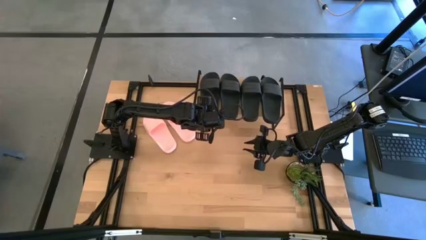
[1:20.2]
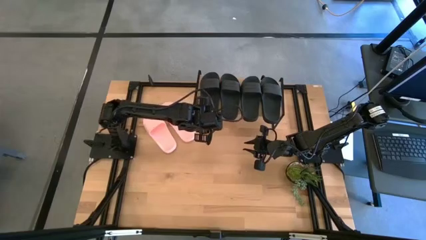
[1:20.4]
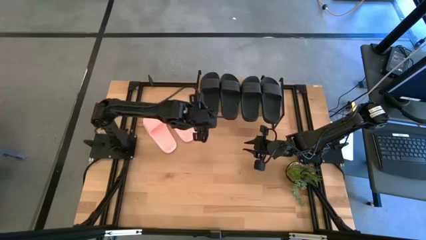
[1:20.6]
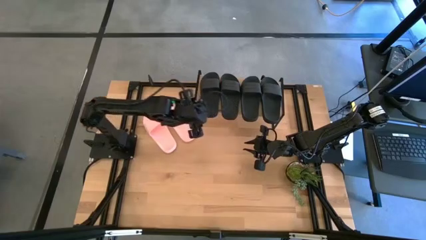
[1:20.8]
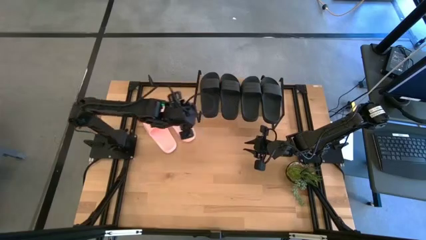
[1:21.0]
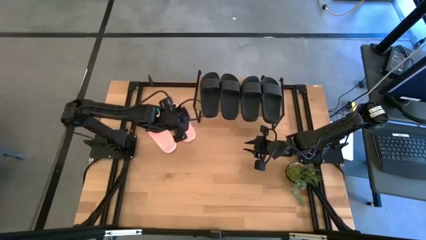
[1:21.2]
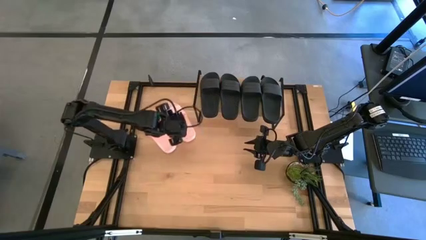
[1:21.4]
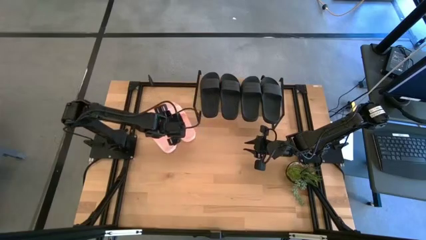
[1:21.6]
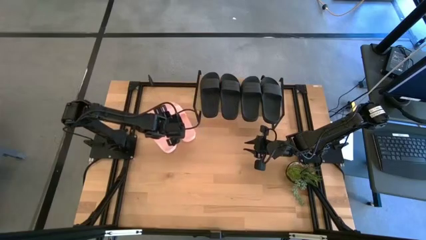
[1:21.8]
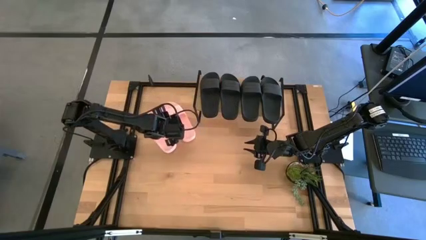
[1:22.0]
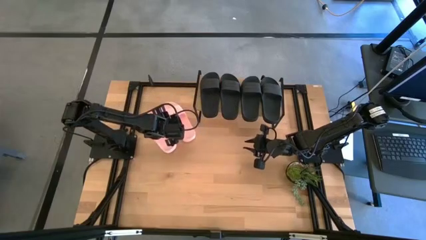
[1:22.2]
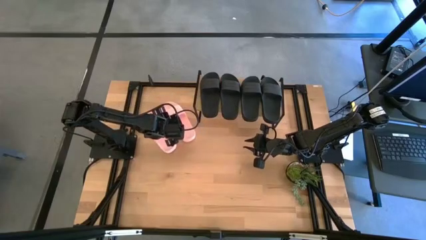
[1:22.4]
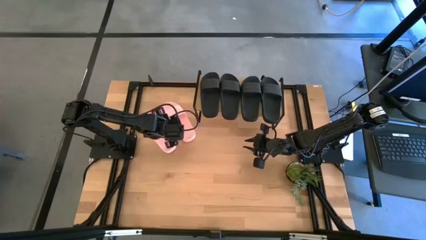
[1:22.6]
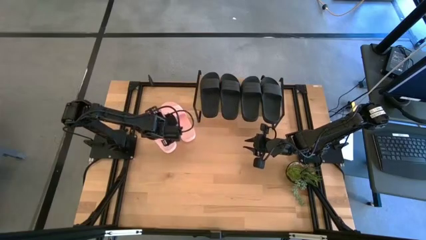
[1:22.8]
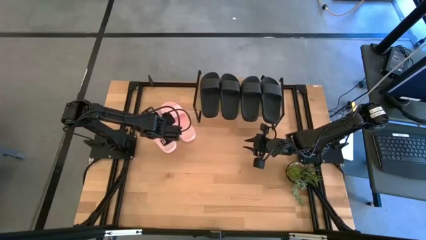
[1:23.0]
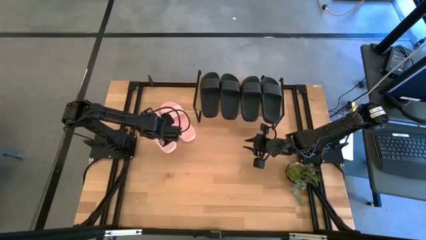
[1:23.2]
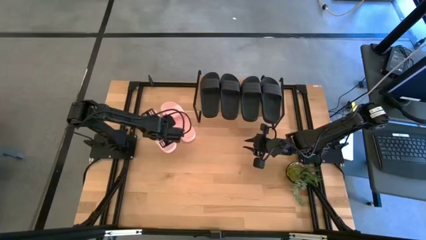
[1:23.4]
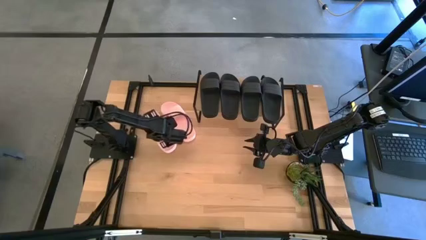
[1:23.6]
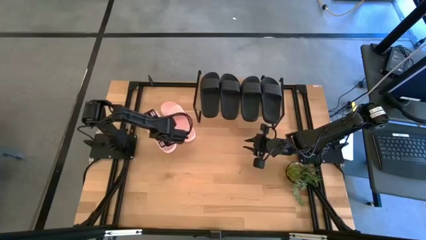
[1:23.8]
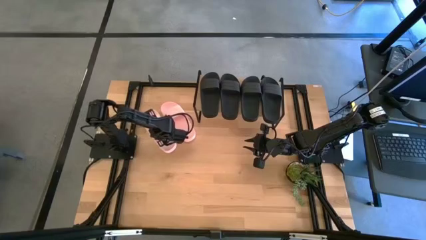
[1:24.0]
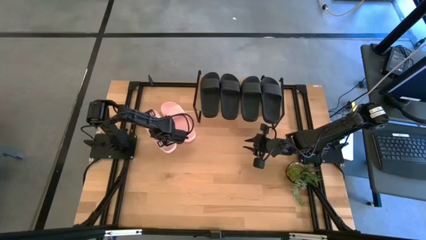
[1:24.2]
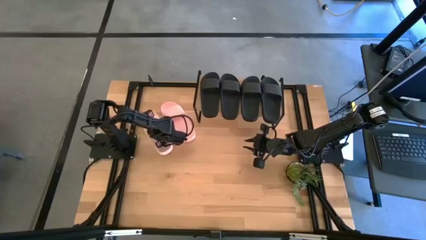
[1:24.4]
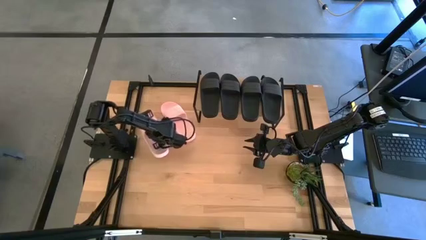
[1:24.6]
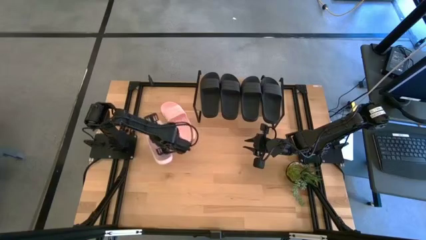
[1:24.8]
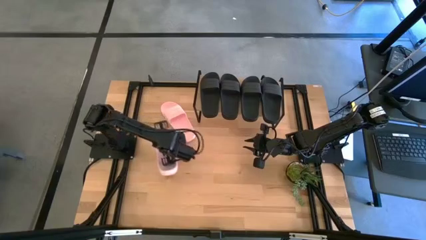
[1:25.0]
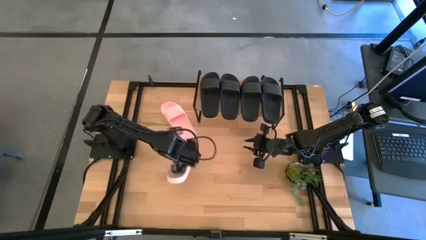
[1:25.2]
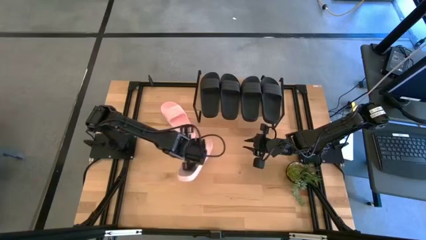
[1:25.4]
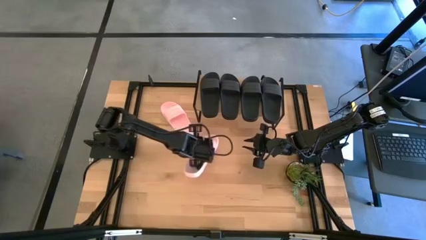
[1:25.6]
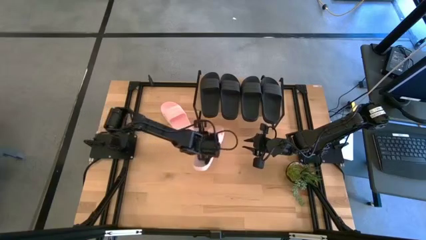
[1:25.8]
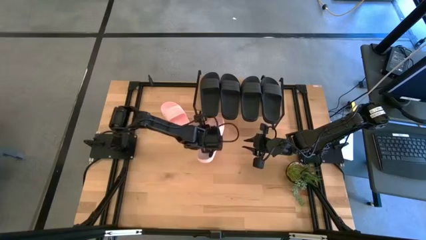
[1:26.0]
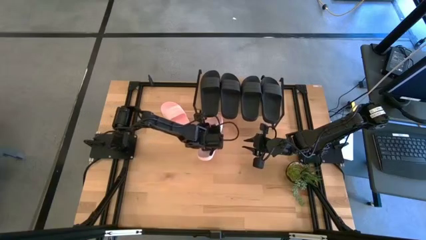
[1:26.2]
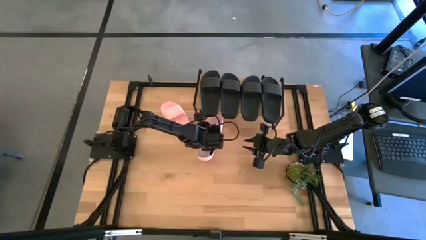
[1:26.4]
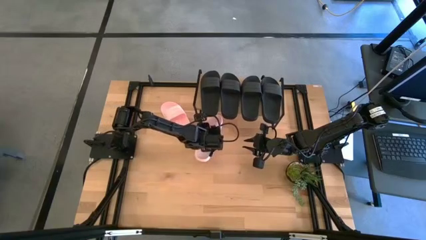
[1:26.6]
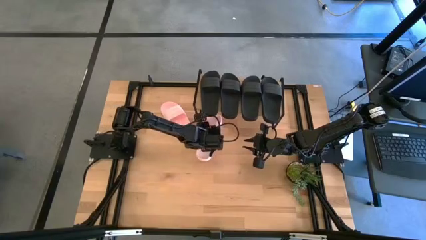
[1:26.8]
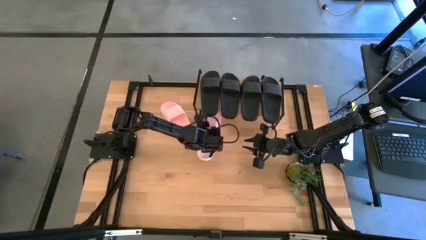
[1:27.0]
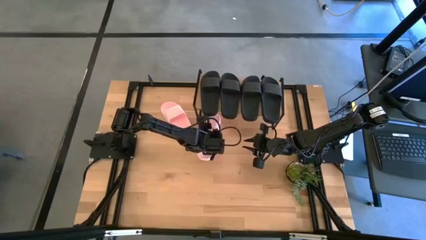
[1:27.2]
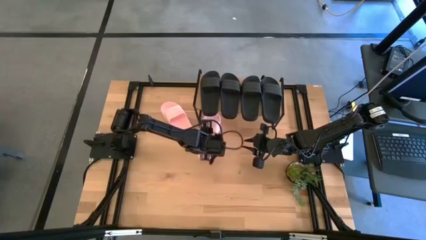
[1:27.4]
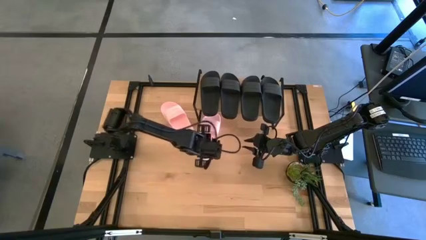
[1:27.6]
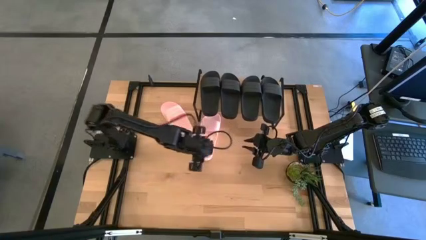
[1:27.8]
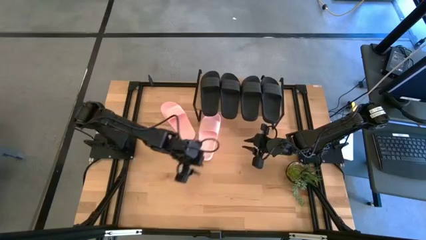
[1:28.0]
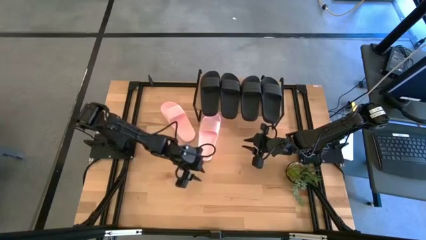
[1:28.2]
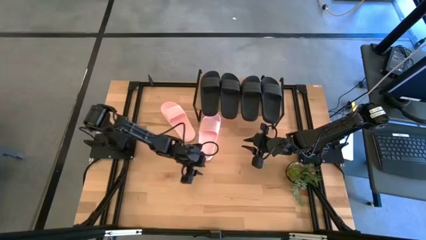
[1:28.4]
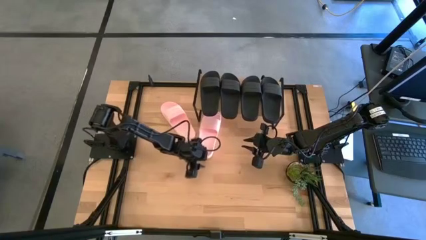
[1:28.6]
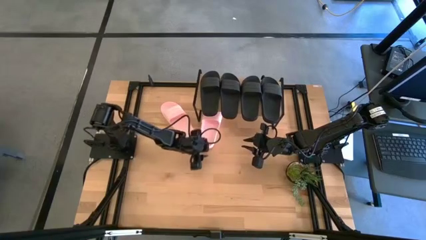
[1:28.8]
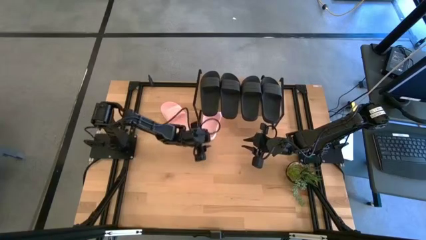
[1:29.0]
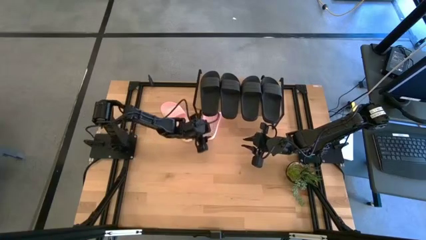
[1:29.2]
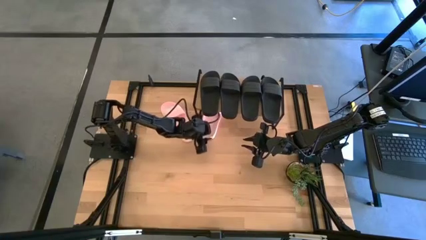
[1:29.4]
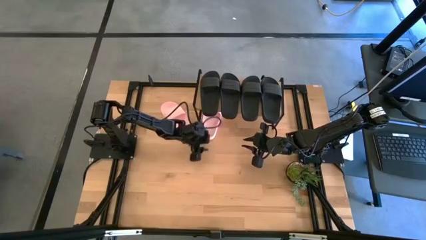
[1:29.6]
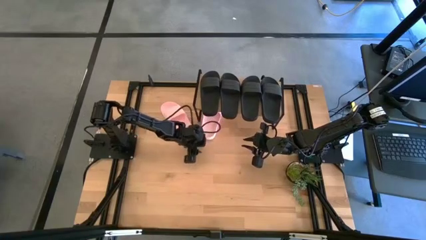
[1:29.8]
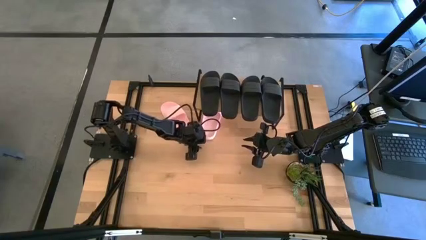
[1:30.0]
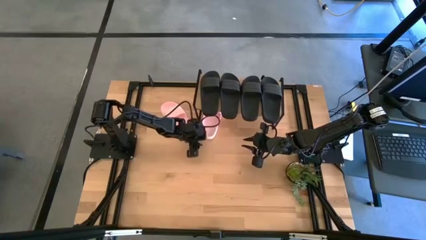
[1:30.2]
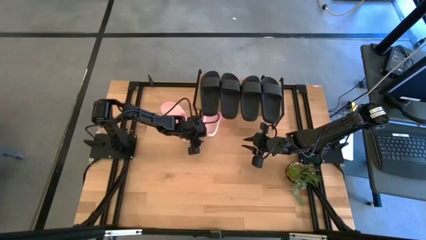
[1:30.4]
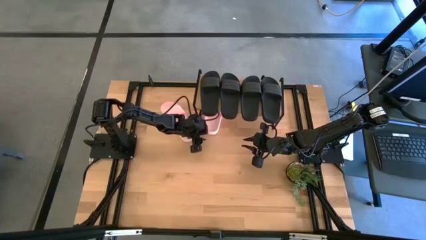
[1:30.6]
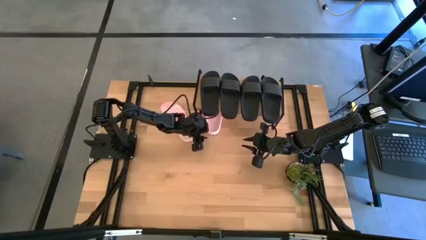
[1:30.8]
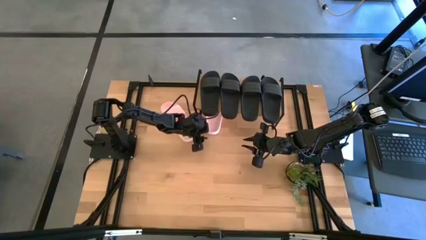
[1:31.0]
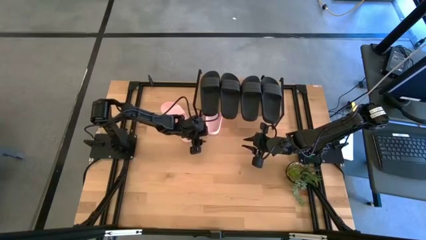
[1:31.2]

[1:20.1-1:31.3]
Task: Pick and place slides into the shelf
Put the pink slide under the shelf

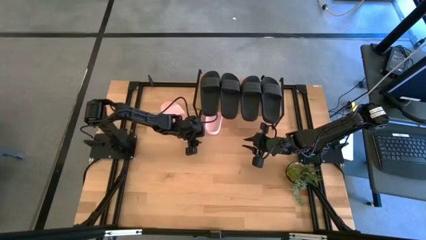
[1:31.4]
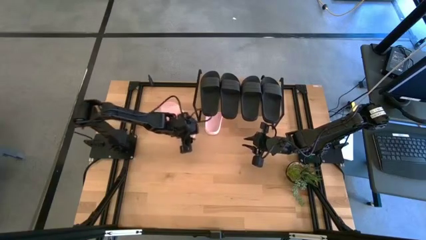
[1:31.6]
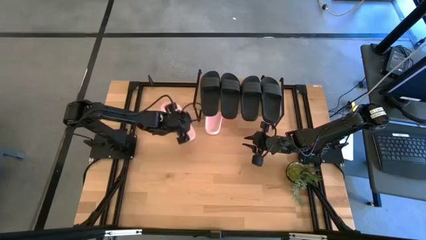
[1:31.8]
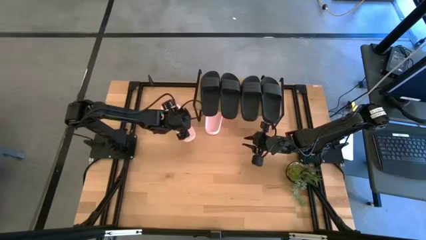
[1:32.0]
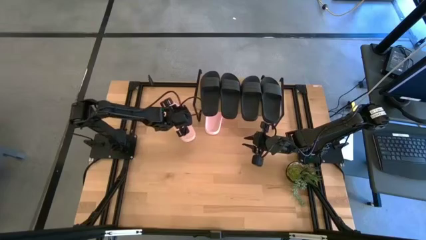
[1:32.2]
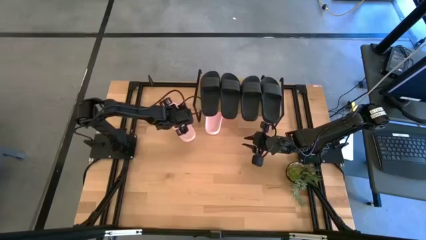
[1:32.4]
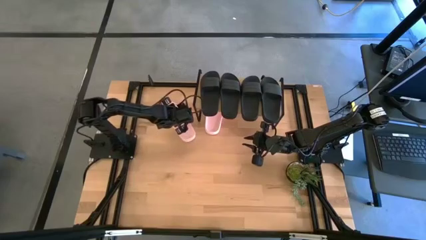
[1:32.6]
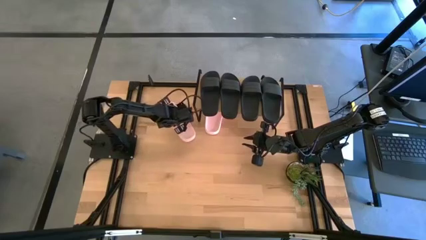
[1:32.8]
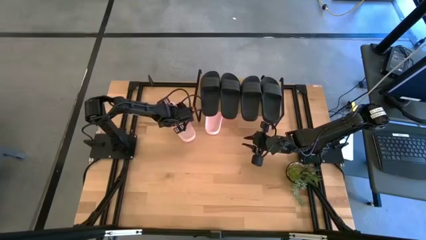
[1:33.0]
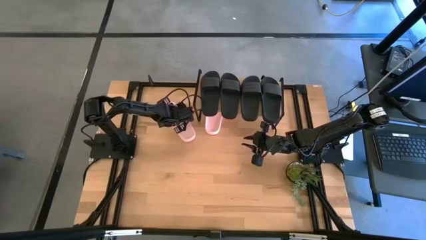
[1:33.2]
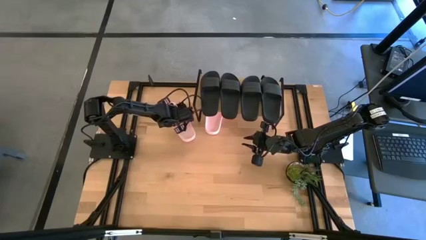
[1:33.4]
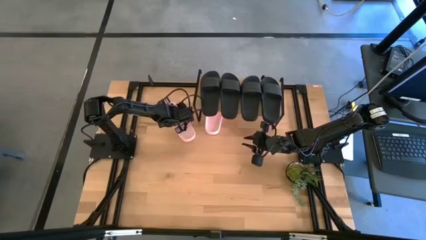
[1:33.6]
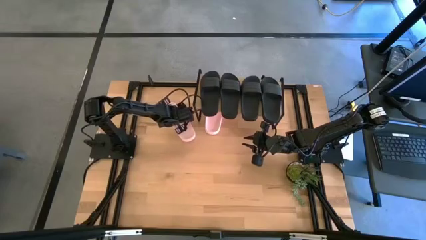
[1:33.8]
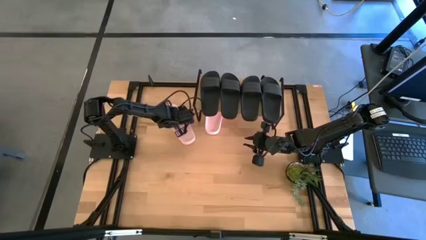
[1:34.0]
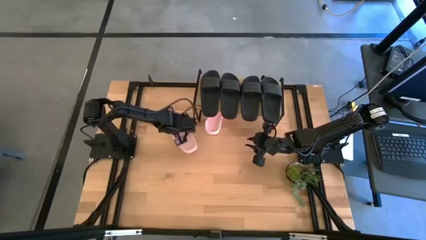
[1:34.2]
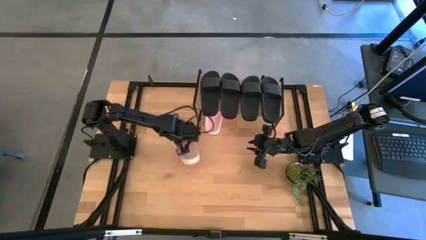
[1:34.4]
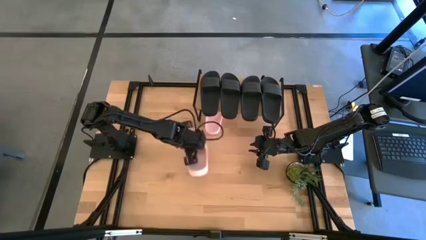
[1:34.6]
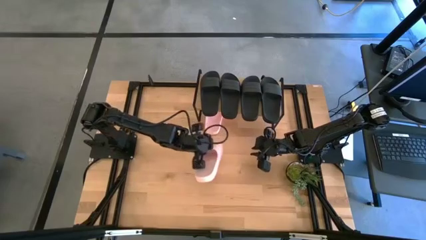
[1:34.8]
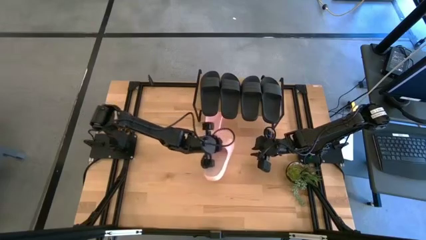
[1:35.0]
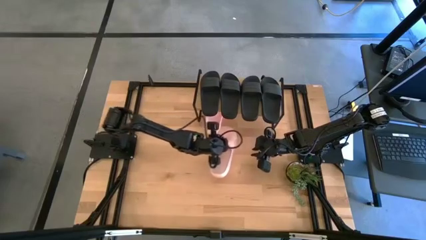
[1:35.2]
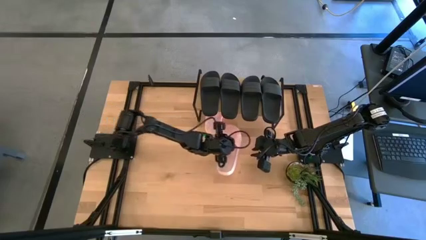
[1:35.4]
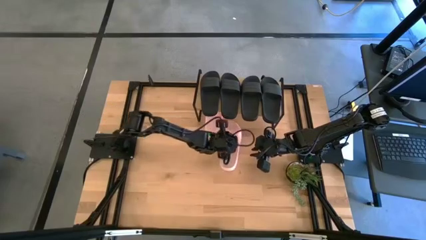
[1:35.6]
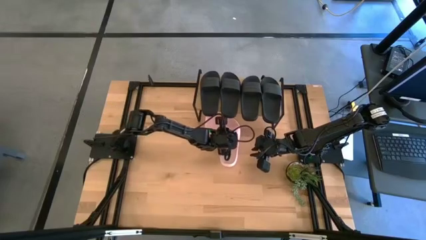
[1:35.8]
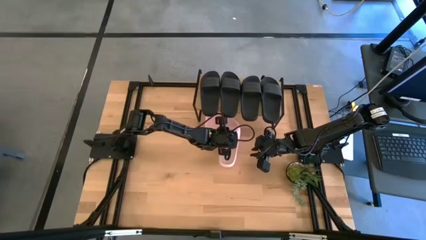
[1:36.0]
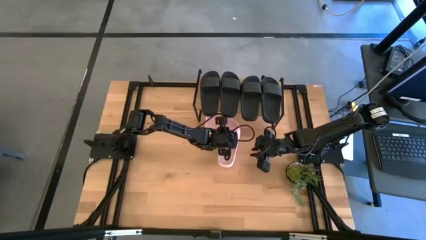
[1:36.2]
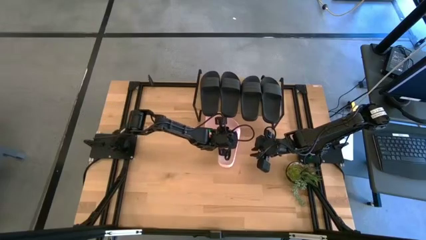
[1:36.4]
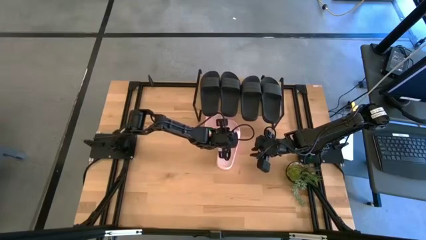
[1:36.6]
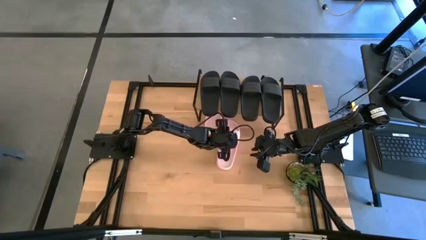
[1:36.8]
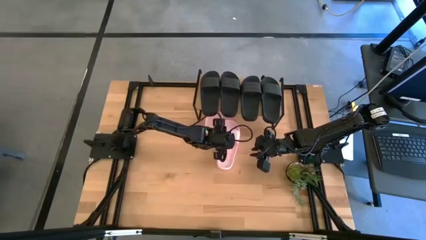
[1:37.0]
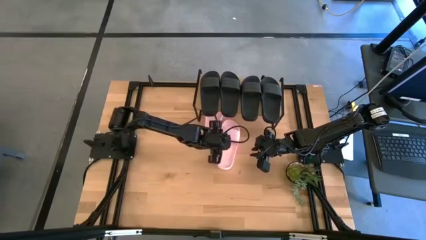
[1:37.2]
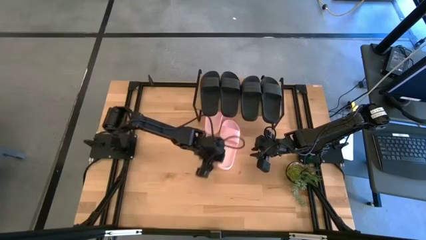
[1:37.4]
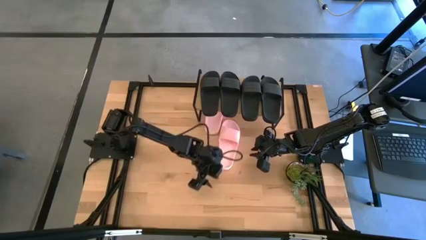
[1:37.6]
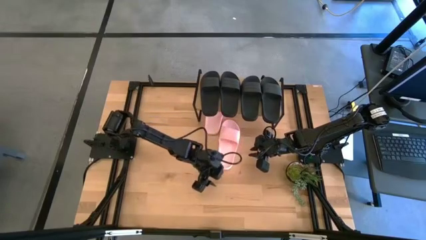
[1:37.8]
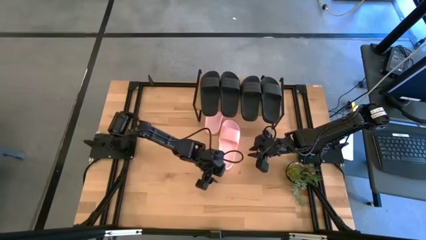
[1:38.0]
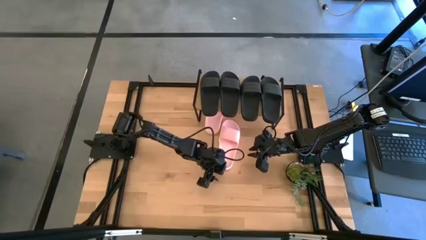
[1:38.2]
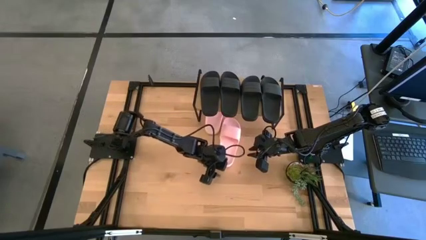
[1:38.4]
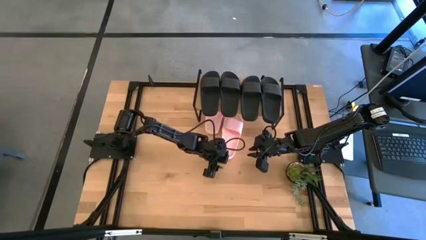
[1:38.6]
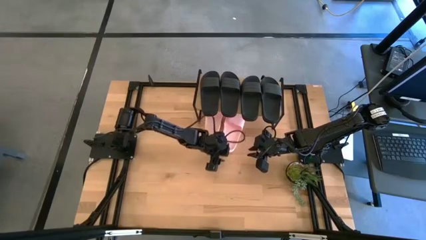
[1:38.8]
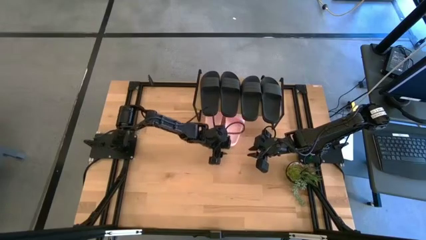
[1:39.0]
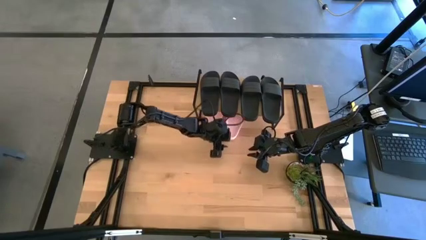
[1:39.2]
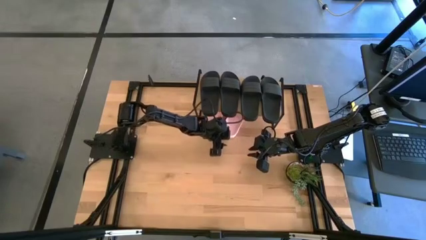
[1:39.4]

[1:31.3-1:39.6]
Put the pink slide under the shelf
